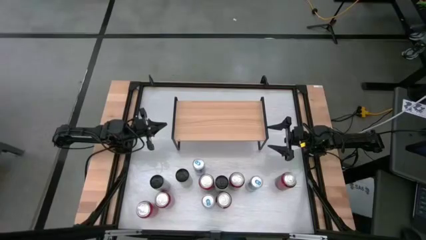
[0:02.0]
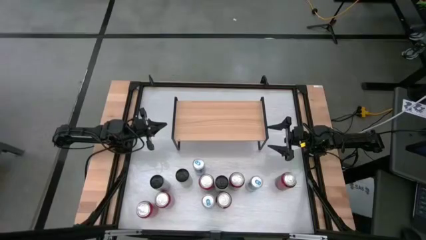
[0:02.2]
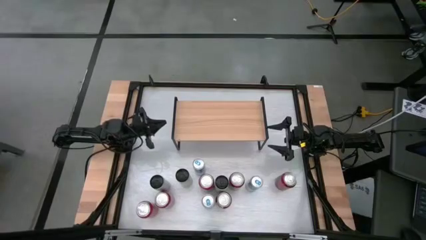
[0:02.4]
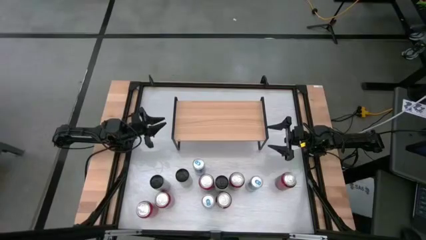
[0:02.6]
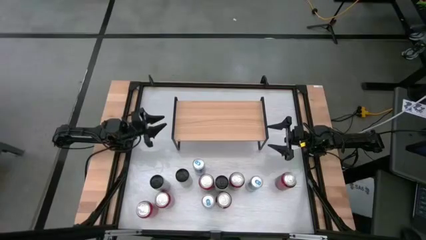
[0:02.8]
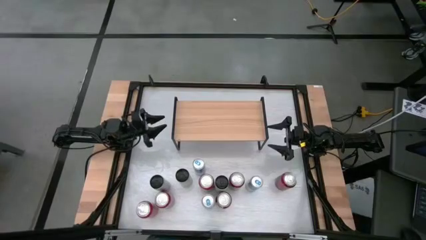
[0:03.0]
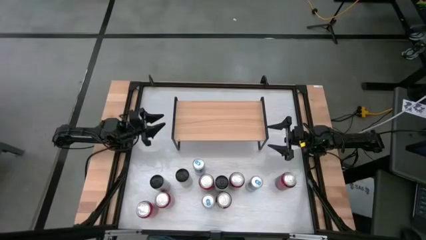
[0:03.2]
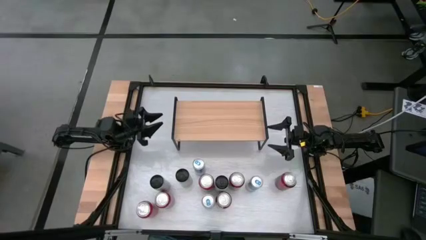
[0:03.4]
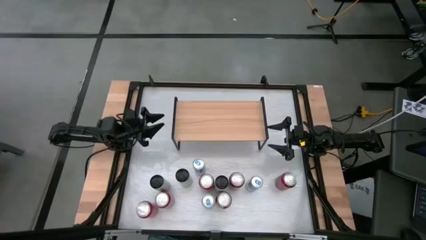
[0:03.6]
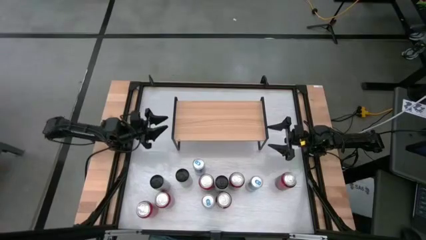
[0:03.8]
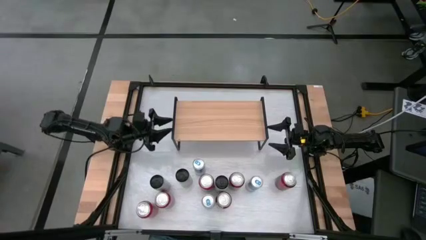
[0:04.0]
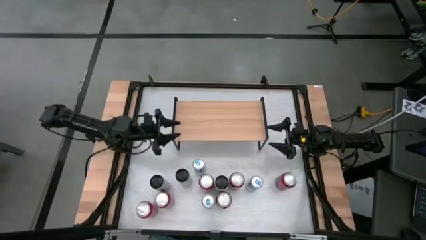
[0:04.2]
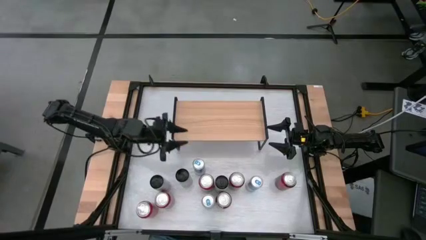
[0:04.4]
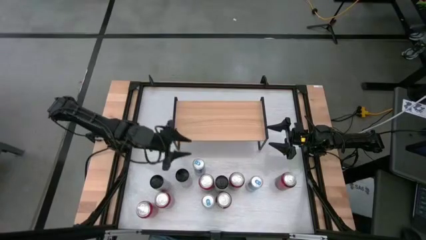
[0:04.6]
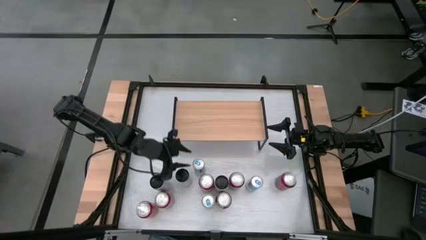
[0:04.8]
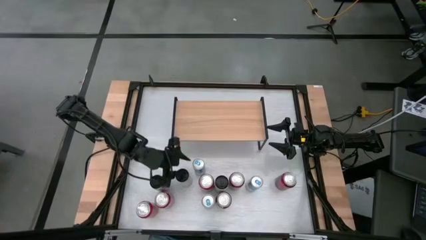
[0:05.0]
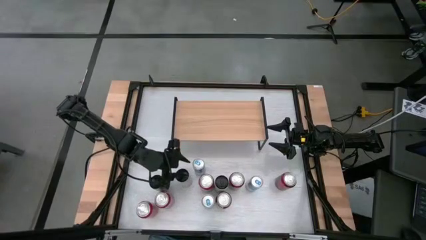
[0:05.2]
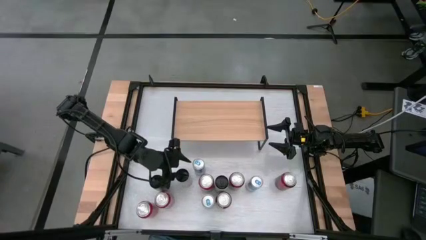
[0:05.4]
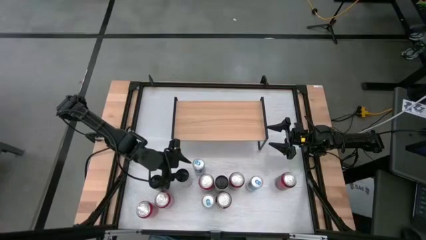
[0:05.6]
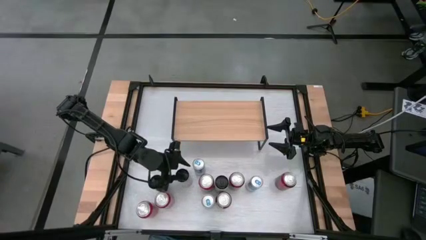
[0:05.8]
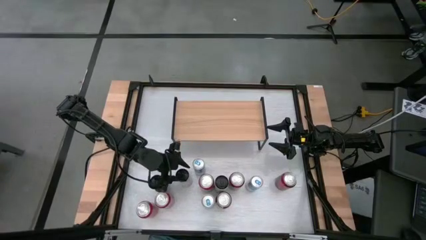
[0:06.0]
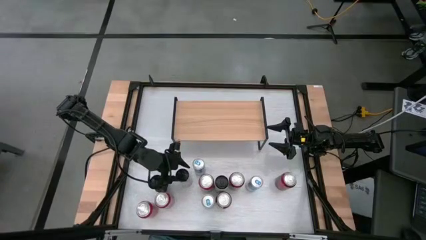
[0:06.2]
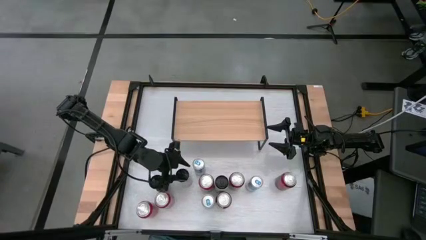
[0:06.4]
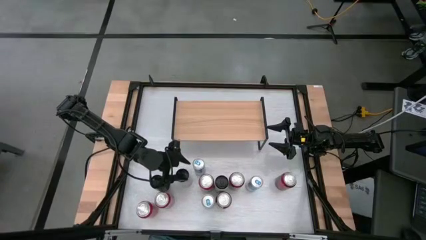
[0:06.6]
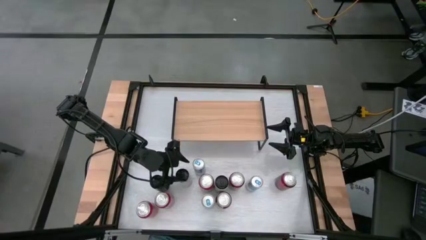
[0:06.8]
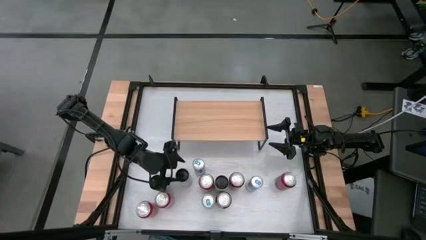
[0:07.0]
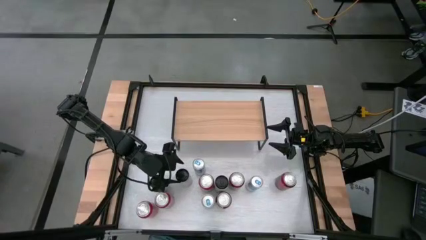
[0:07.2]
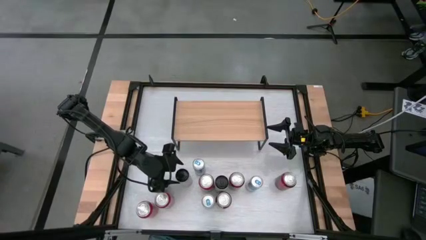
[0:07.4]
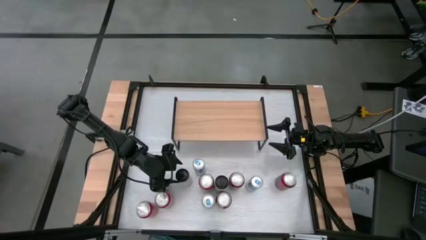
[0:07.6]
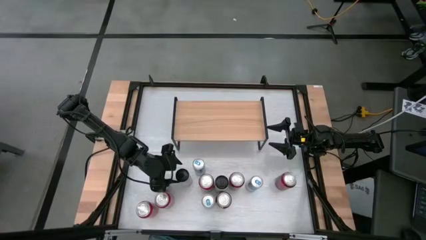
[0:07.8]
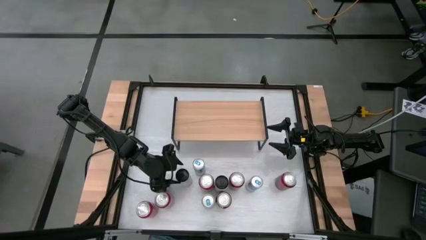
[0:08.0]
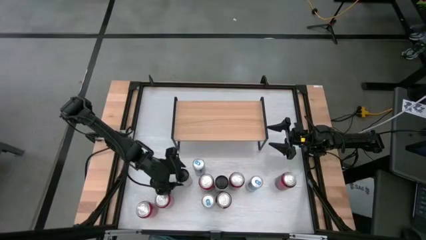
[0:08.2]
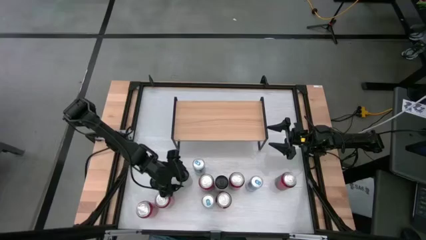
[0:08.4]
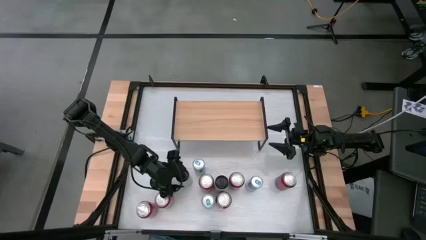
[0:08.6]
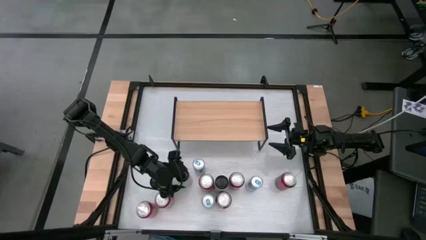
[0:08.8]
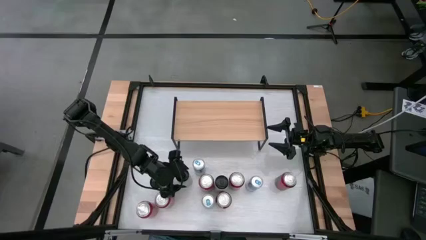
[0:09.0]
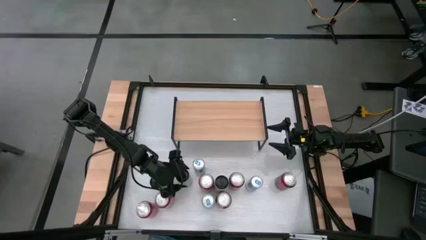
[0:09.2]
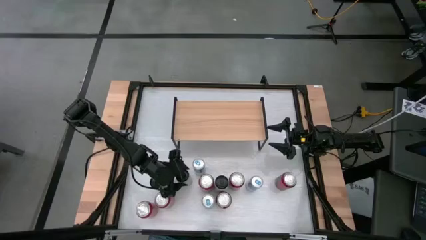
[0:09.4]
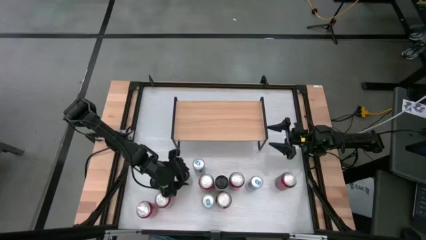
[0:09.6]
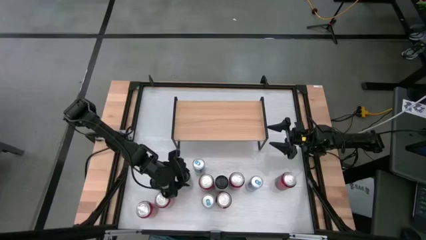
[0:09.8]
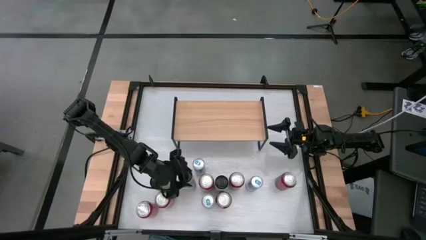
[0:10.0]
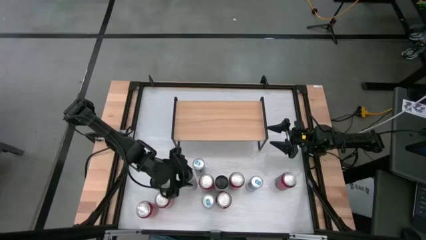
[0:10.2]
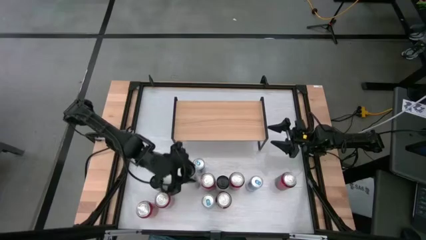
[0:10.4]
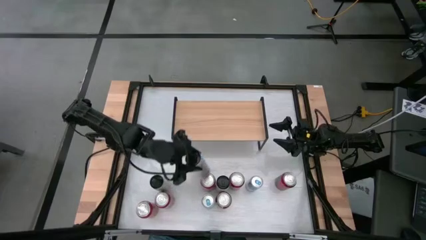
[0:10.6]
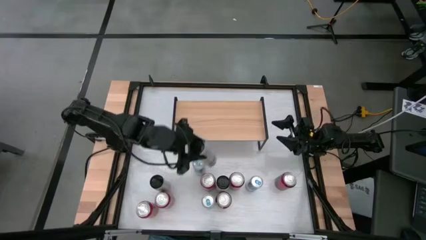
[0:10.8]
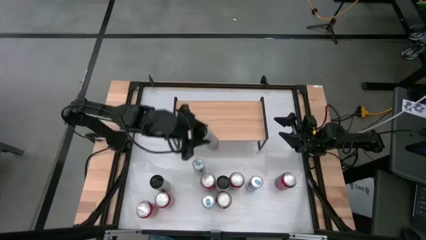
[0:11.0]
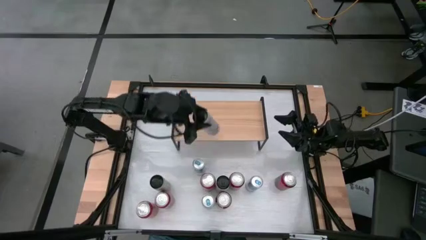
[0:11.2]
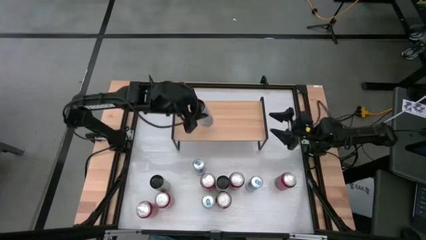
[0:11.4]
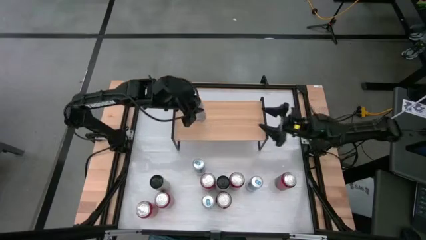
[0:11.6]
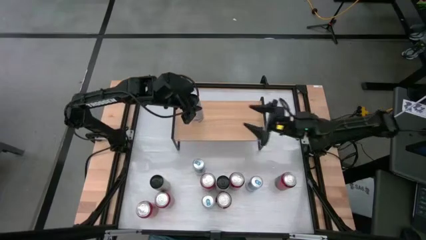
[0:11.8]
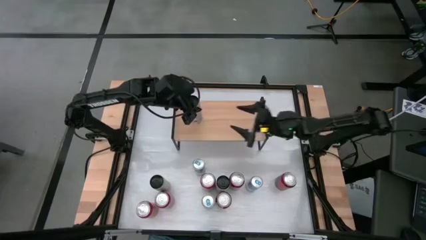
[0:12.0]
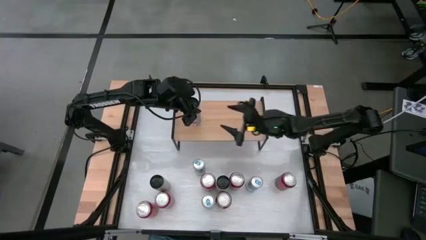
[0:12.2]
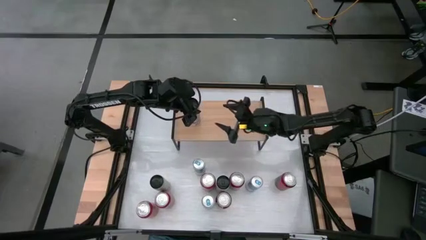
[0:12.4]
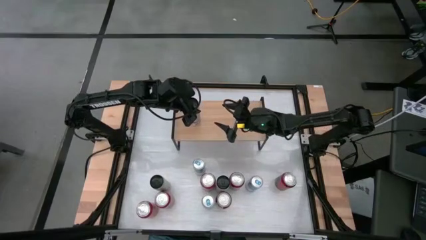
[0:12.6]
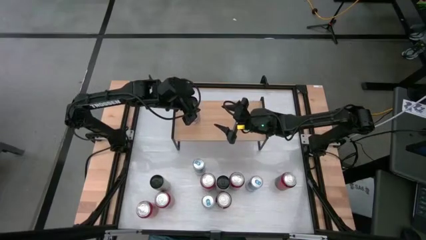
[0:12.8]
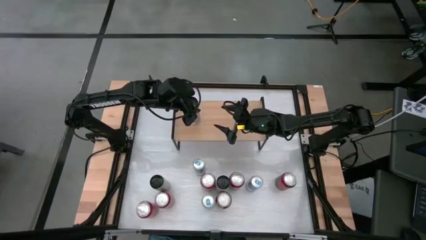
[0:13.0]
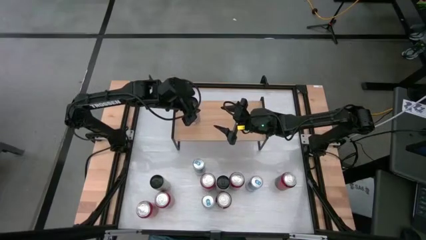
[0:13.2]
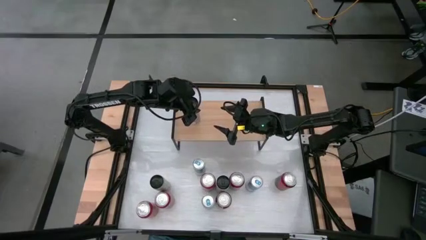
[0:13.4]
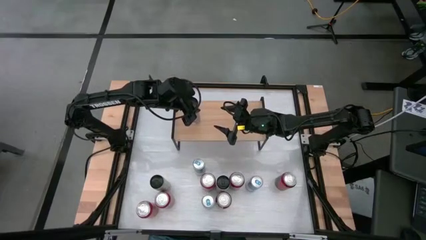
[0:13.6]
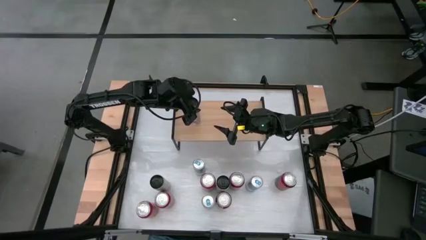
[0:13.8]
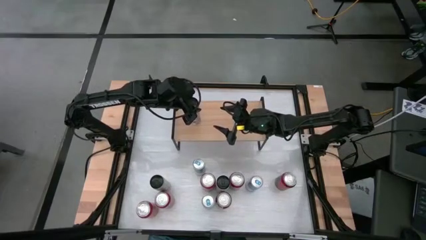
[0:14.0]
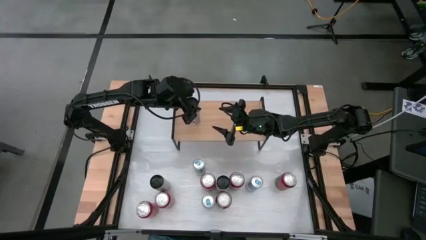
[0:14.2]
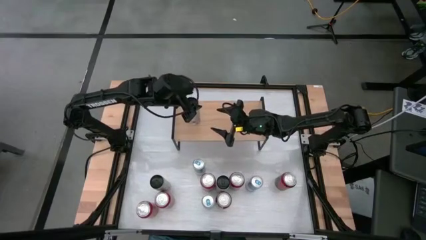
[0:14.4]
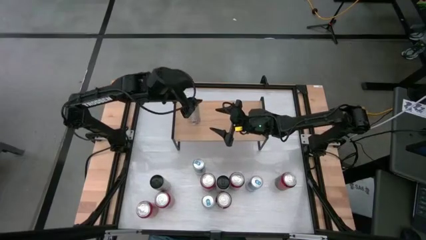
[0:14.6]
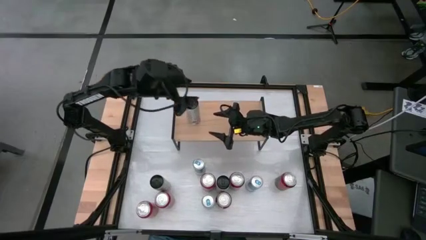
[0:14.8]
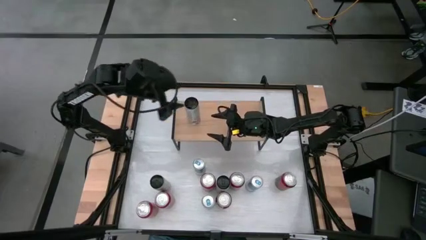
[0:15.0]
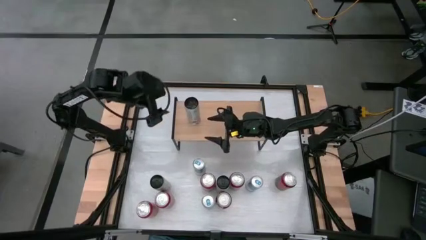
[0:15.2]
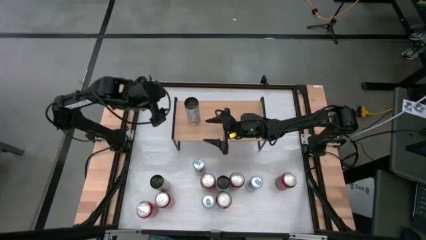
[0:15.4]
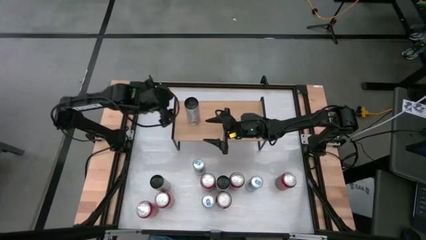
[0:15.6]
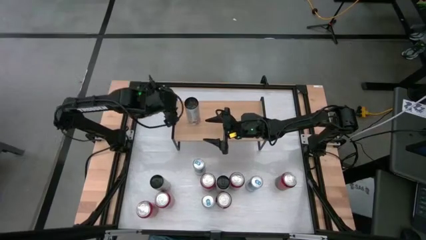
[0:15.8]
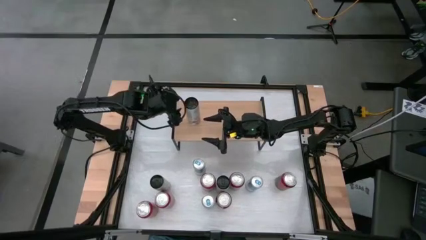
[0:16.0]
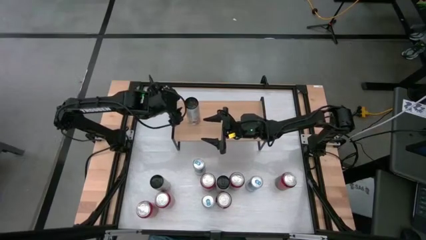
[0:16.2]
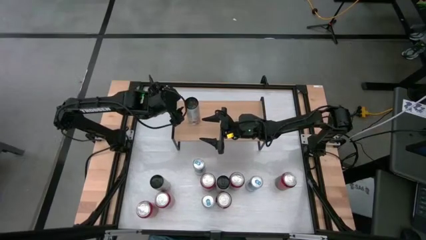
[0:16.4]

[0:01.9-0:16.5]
Task: Place canned beverage on shelf
Put the center white soda can on the shelf
